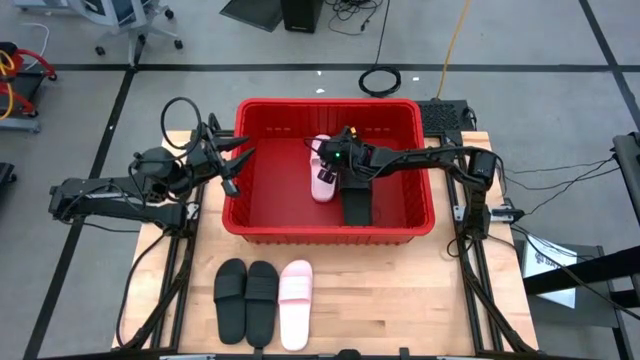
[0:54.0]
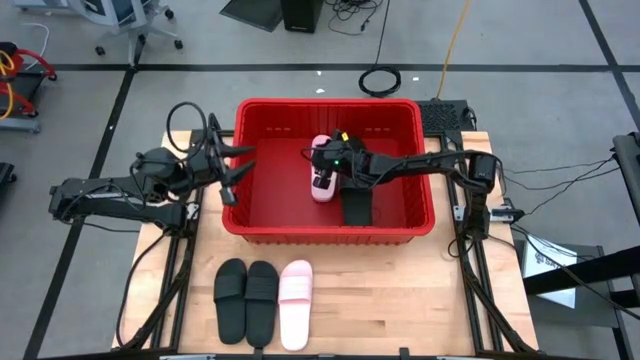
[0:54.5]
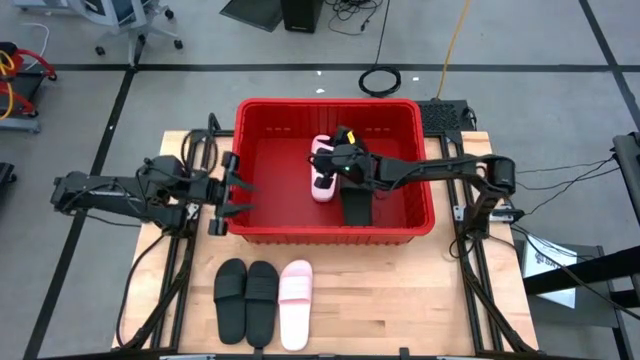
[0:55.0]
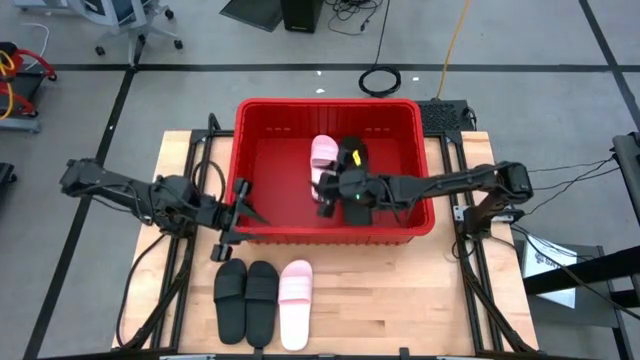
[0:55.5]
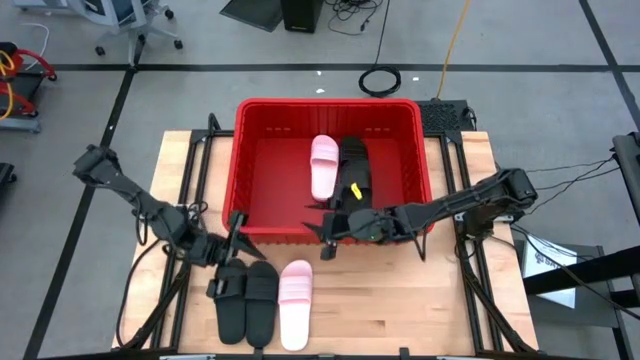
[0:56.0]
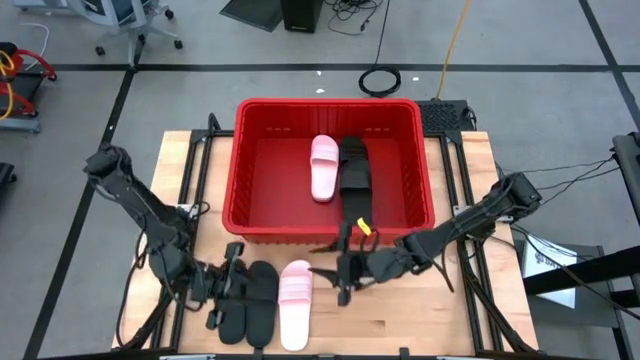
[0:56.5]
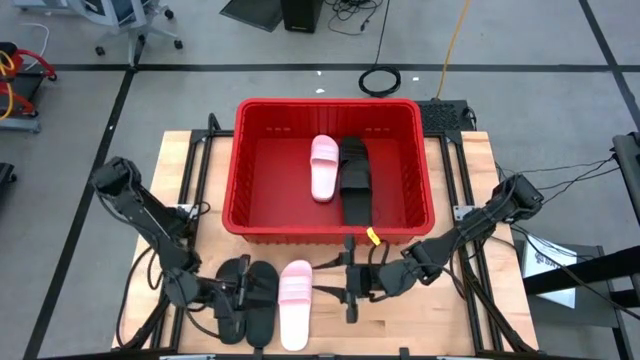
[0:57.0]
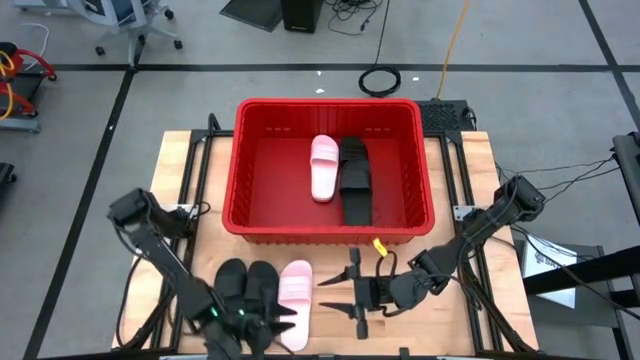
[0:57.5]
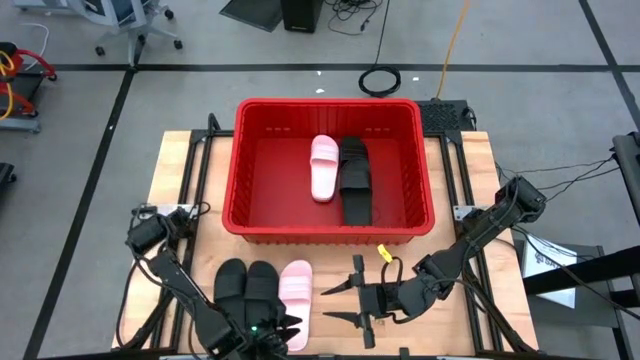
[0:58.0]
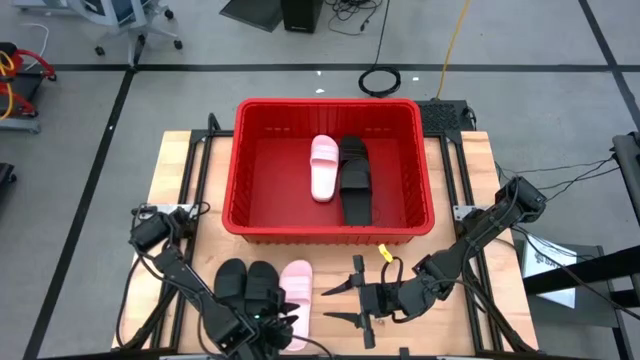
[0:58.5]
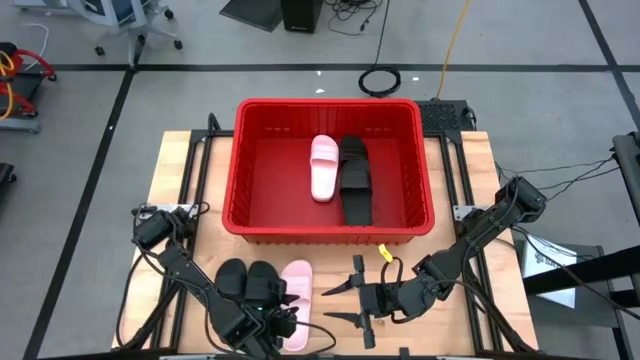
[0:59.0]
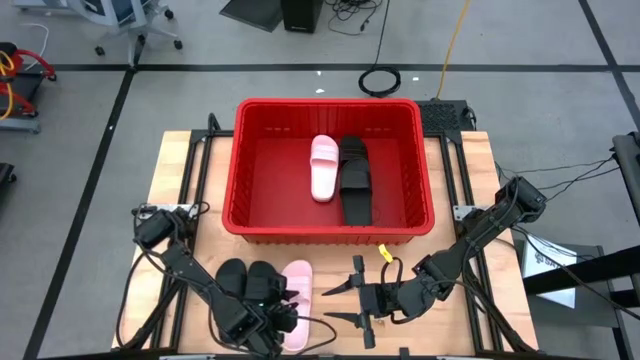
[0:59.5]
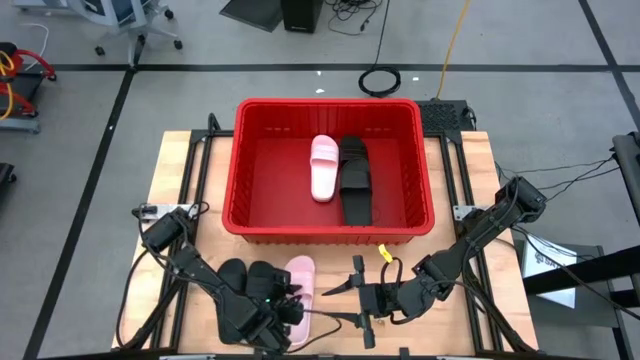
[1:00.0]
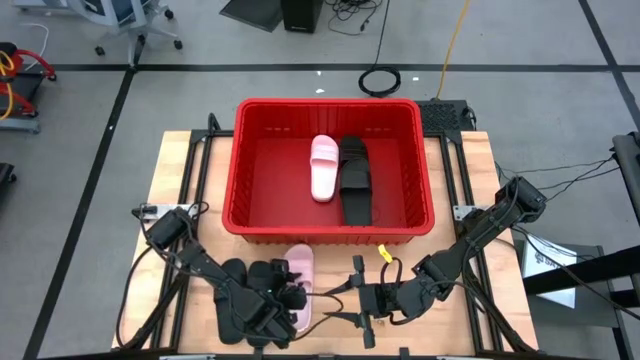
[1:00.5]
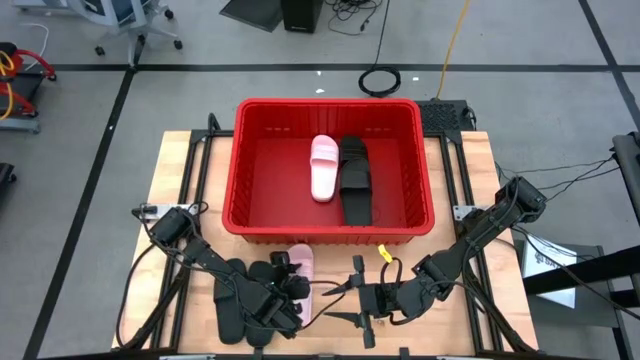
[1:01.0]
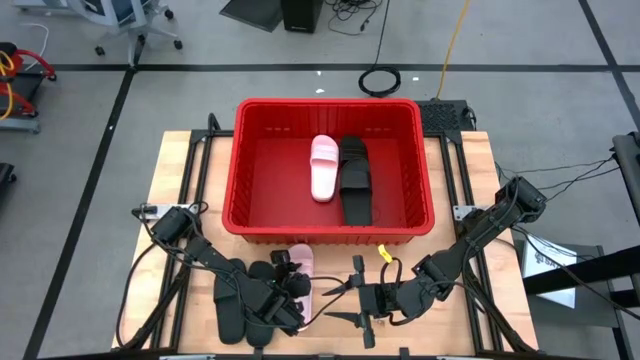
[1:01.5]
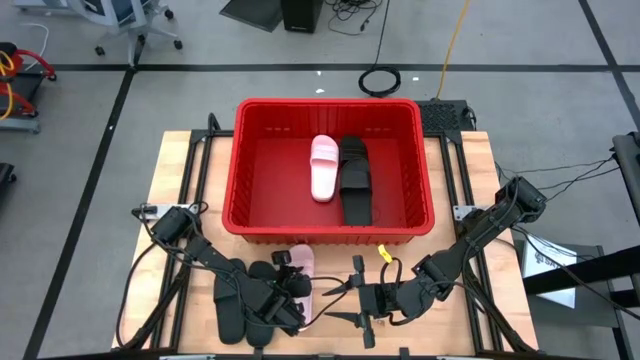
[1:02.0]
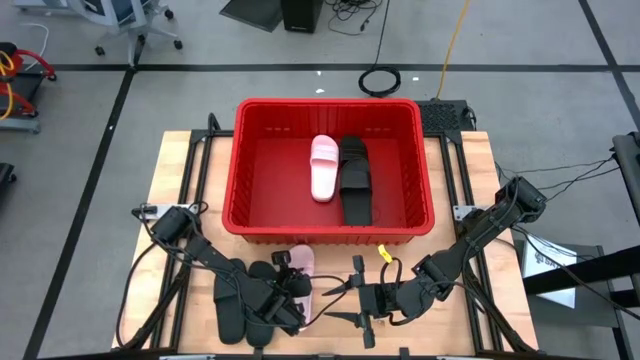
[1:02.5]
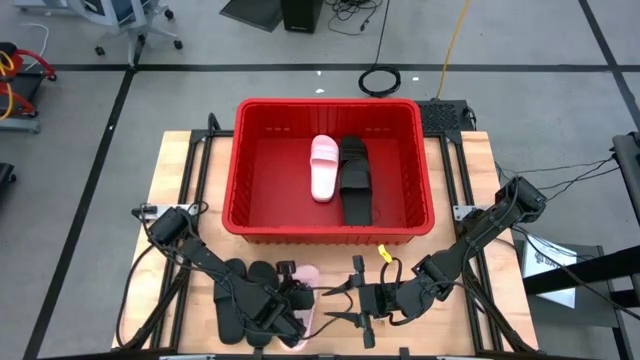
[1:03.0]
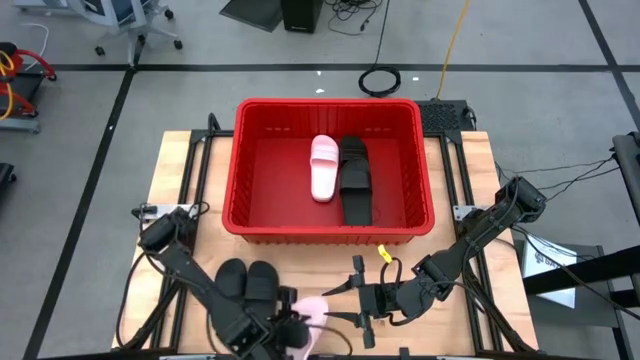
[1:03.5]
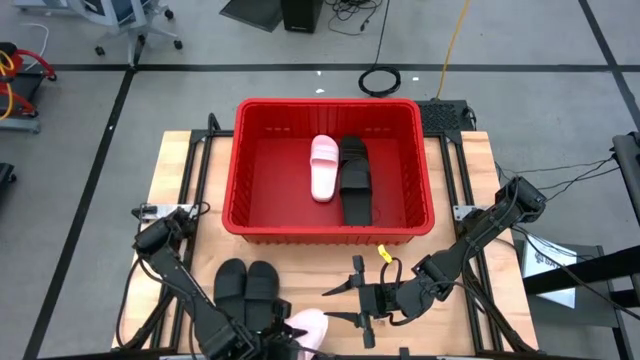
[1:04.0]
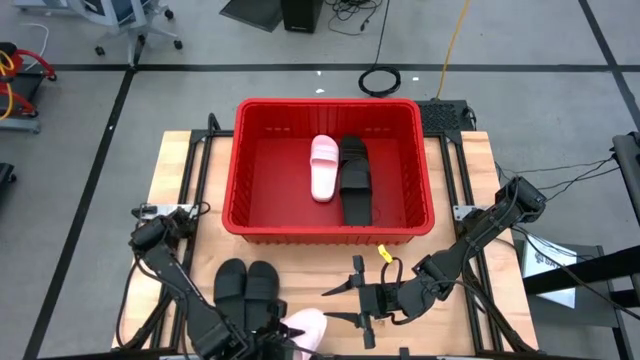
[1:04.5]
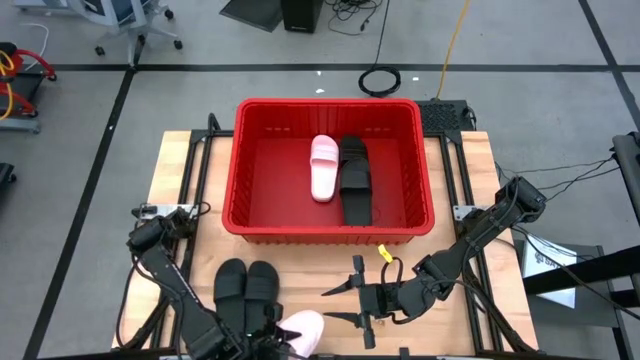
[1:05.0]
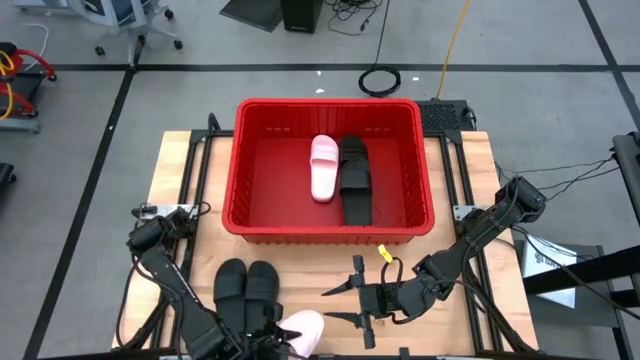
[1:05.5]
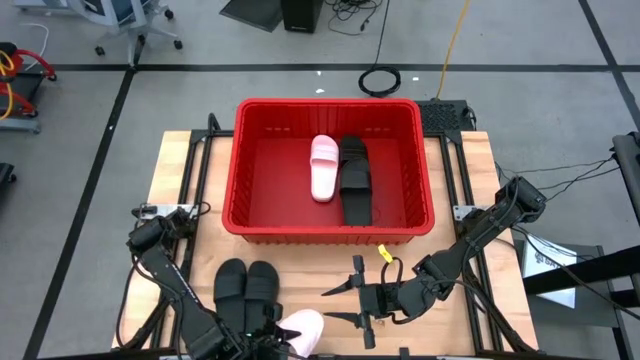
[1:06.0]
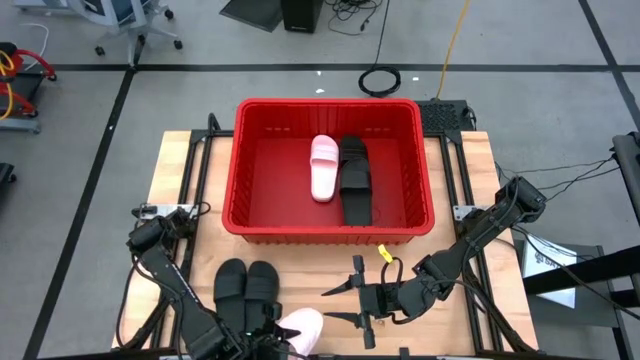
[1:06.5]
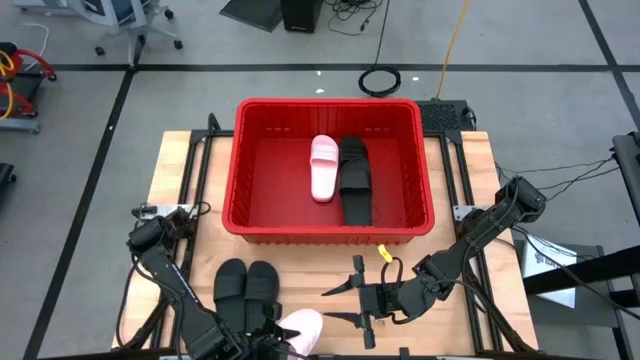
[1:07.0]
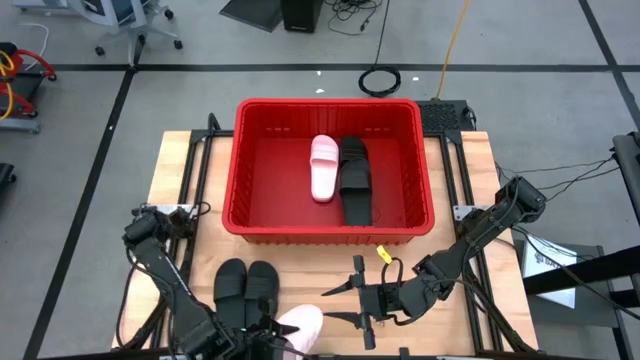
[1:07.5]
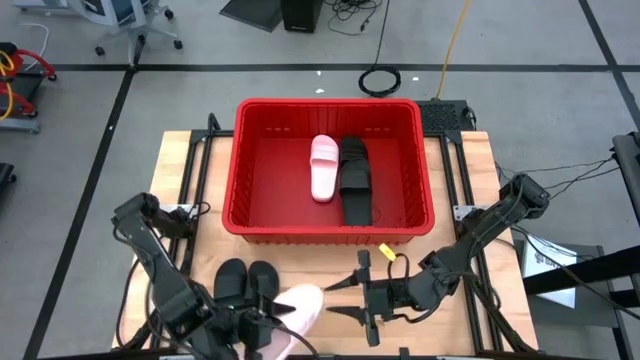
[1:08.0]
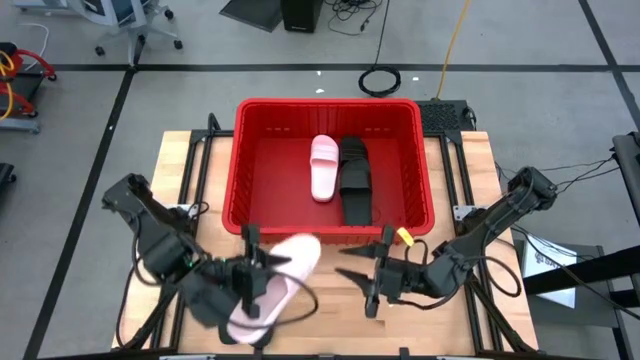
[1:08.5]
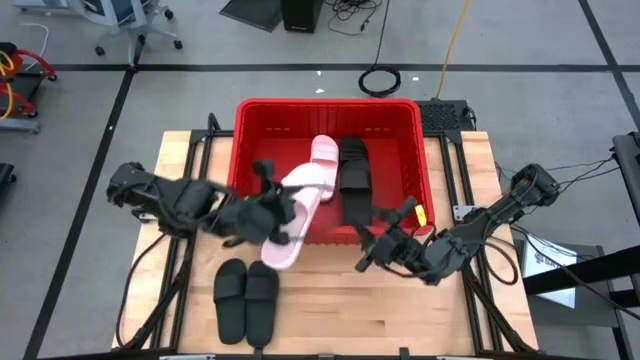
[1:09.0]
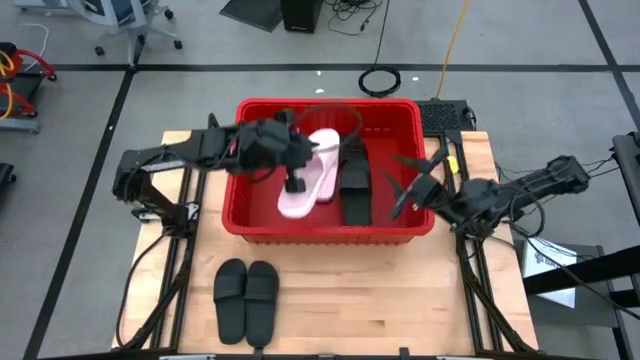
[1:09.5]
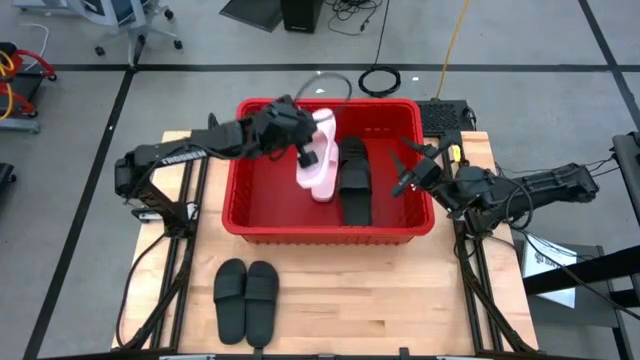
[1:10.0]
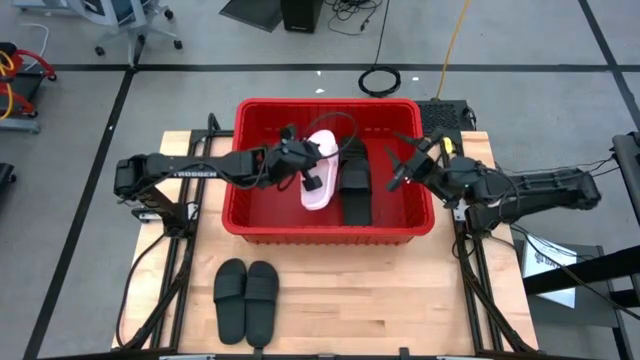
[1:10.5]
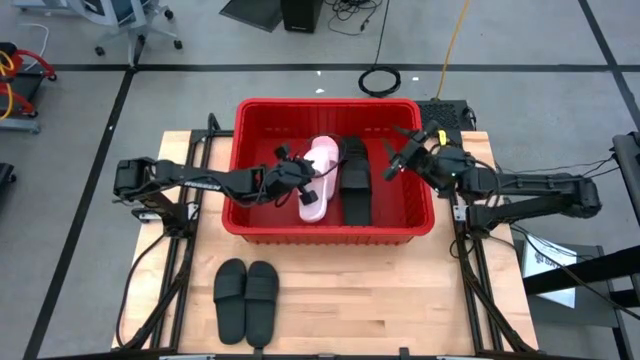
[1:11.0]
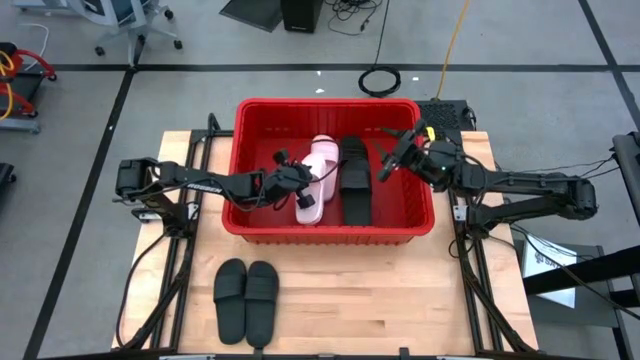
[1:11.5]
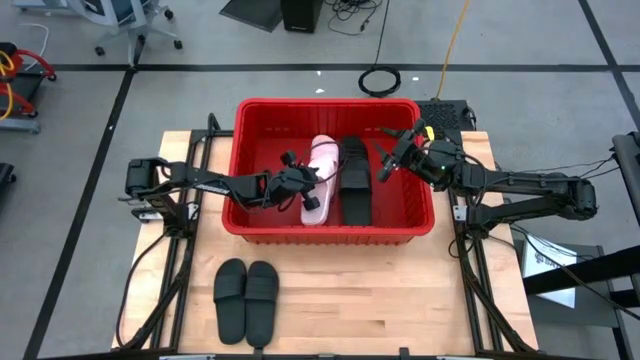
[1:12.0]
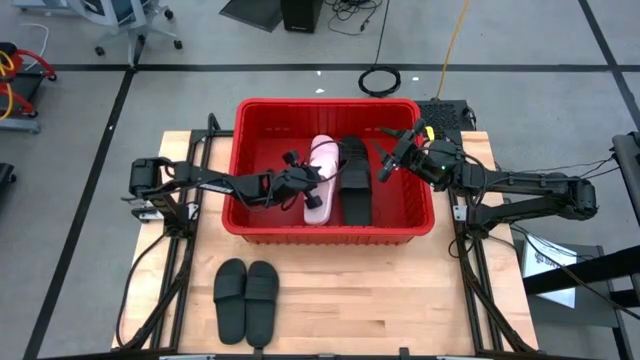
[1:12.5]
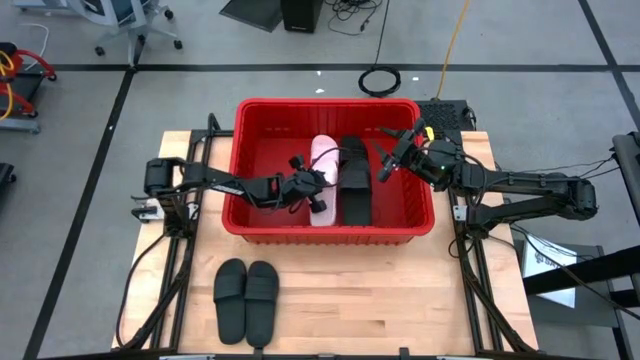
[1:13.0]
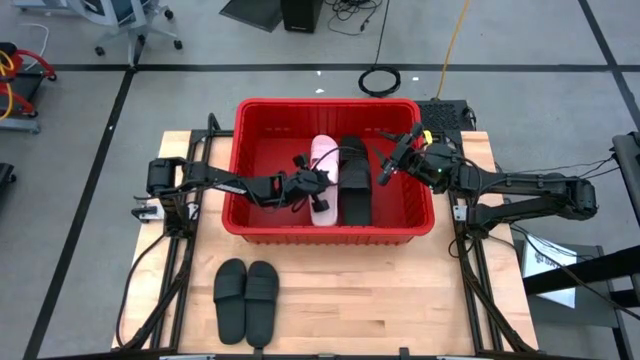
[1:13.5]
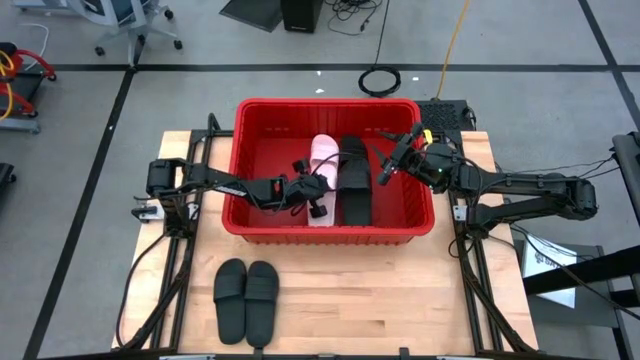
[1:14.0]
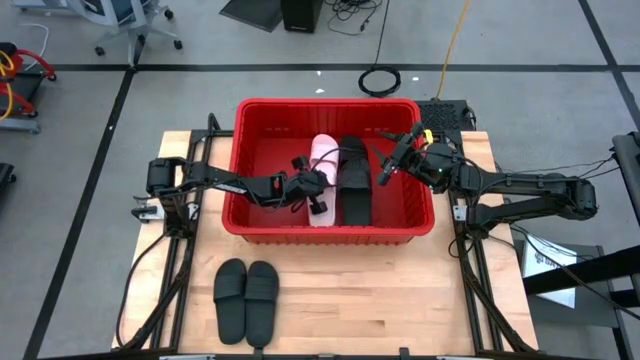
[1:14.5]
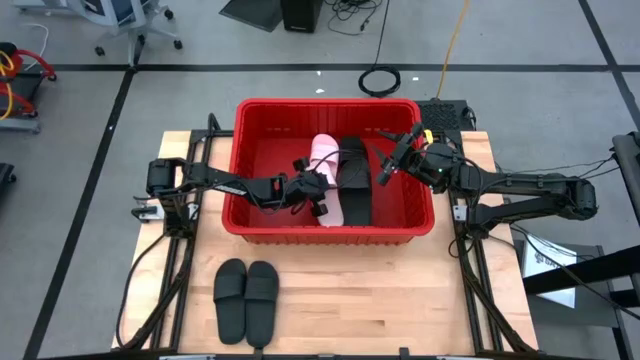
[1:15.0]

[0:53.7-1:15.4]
Task: Pick and place slides into bin
Put the left pink slide into the red bin

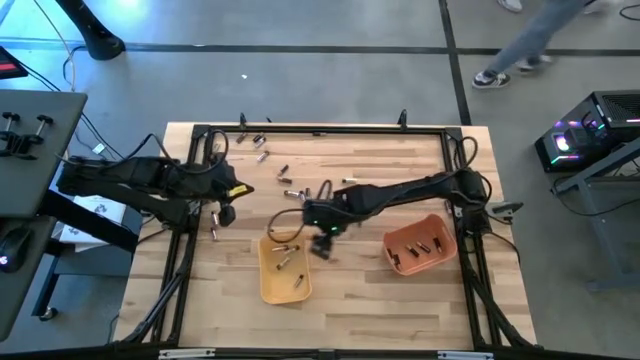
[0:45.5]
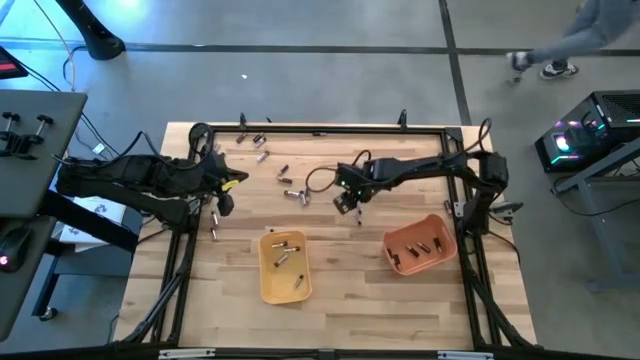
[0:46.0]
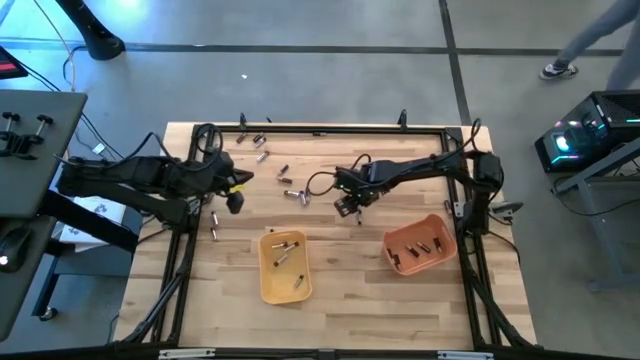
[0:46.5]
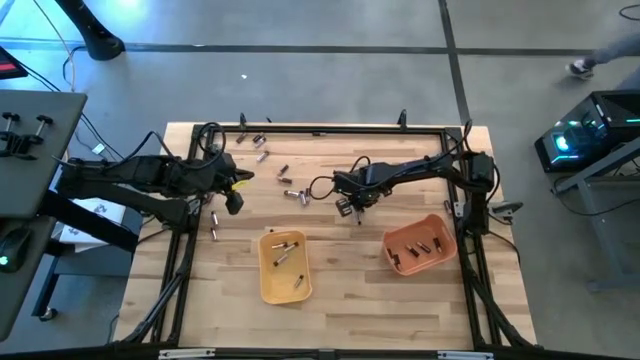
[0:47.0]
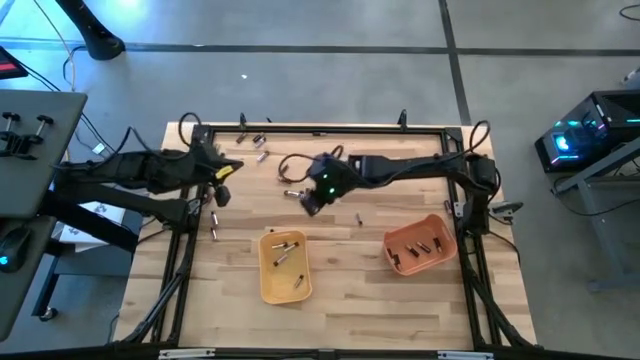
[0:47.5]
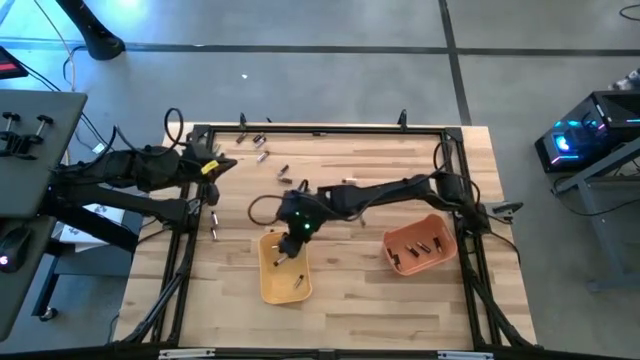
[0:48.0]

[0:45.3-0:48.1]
Task: Sort batteries
Put the silver battery into the yellow bin
